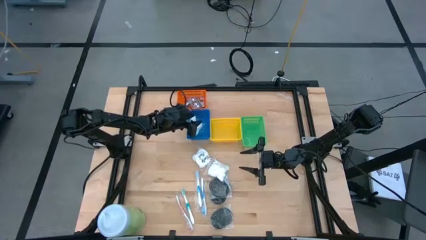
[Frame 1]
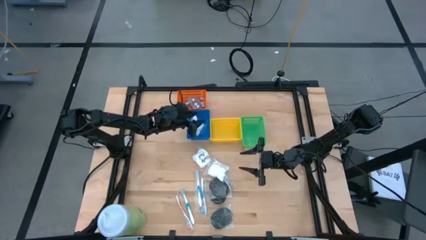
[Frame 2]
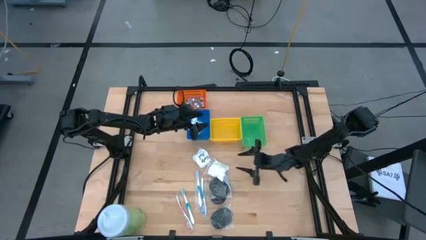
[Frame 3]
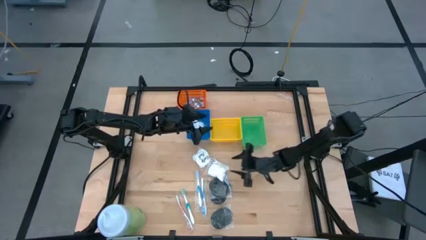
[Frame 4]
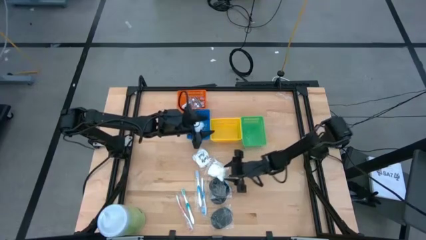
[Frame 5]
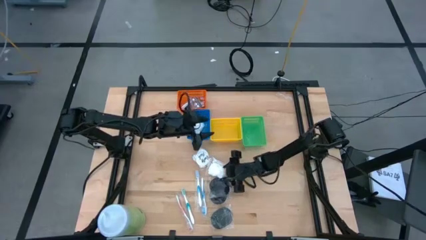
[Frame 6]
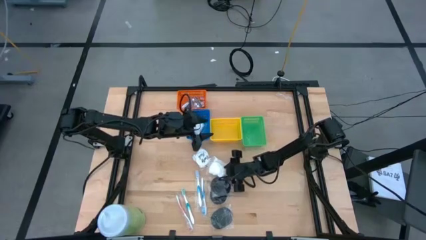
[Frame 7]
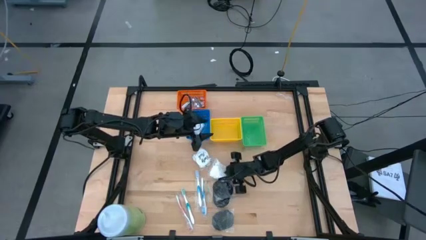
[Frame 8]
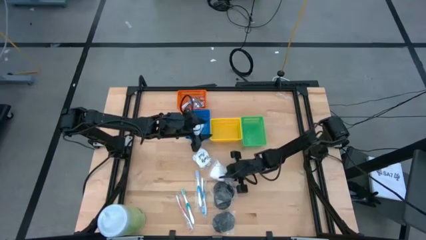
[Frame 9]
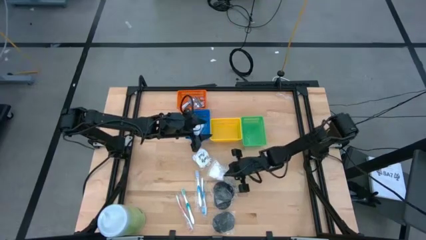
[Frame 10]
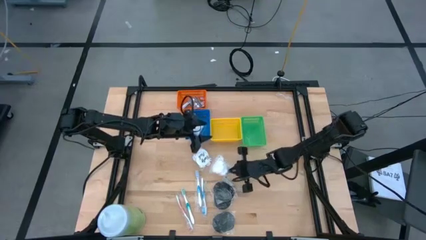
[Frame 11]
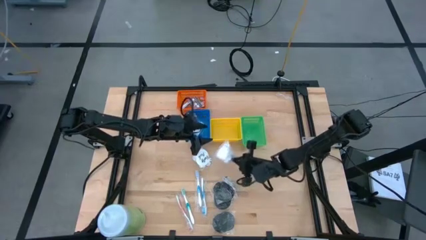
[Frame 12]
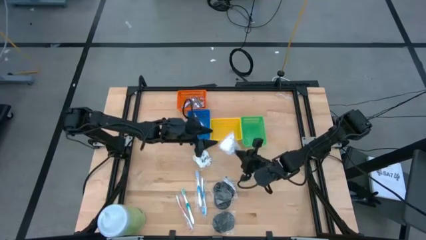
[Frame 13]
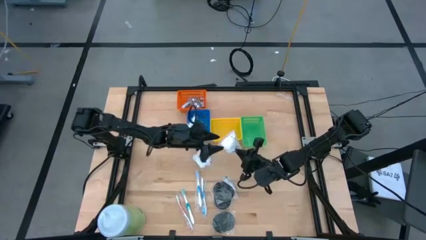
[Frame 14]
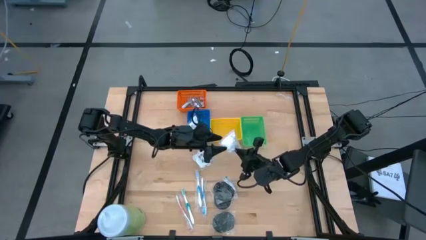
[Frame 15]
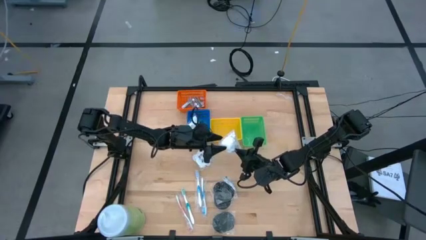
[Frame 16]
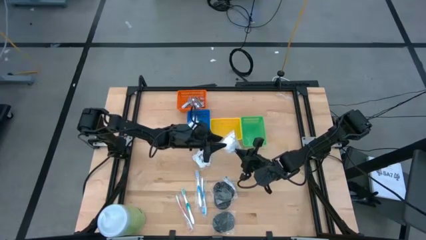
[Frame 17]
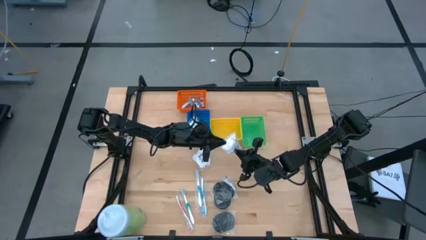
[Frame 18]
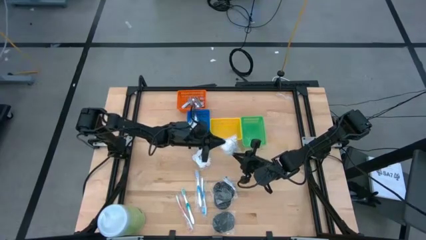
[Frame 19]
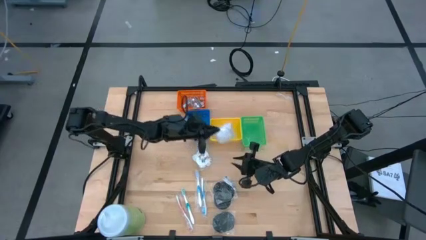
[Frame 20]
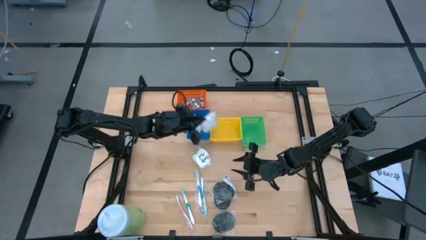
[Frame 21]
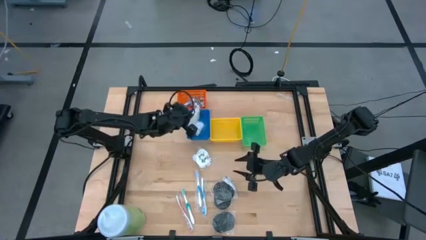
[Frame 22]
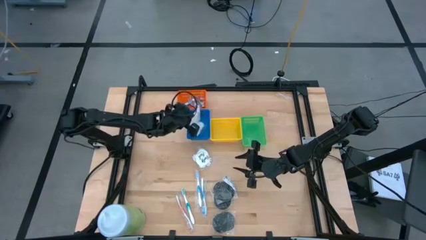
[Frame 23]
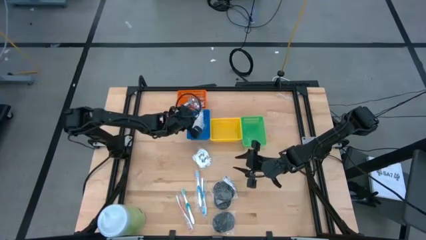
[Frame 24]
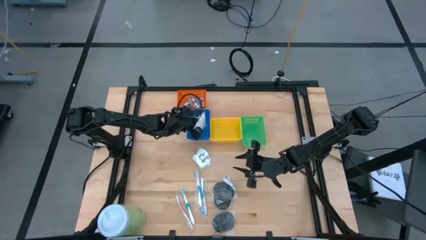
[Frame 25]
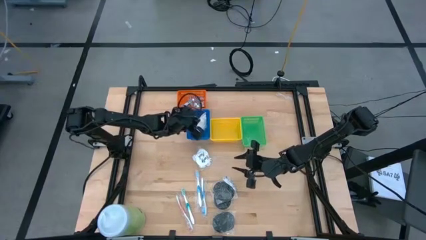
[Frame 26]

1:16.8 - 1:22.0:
Task: Pick & Place Travel size toiletries
Put the right vanity pack into the blue basket

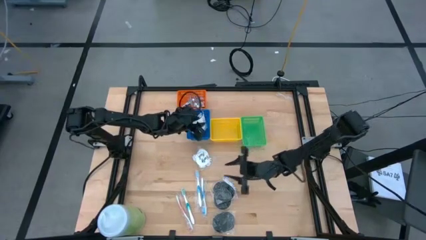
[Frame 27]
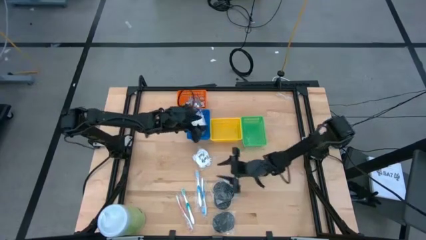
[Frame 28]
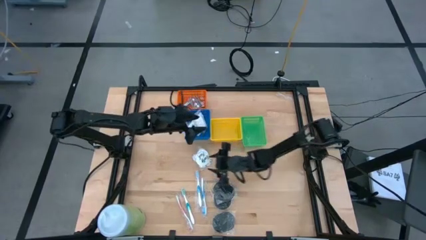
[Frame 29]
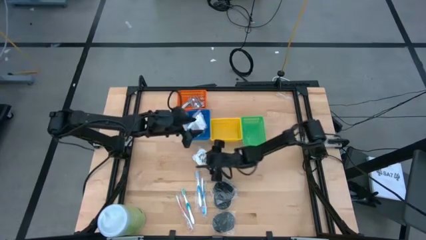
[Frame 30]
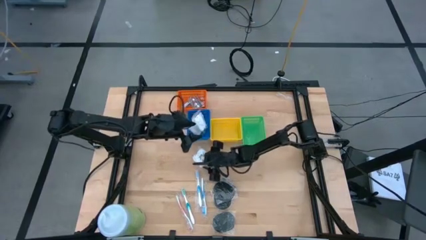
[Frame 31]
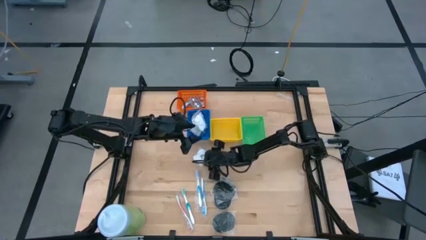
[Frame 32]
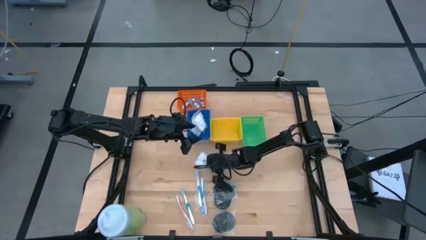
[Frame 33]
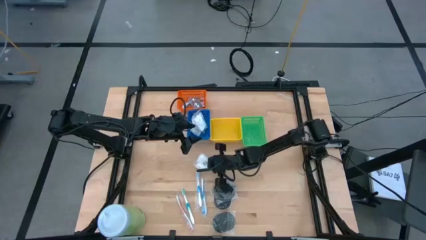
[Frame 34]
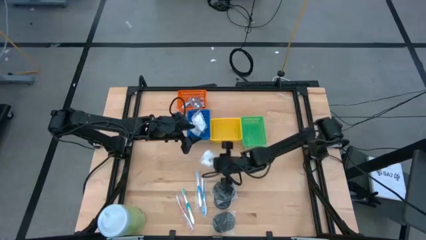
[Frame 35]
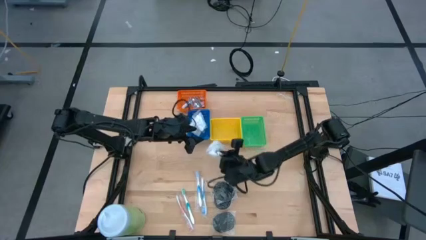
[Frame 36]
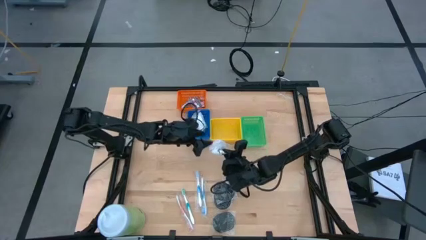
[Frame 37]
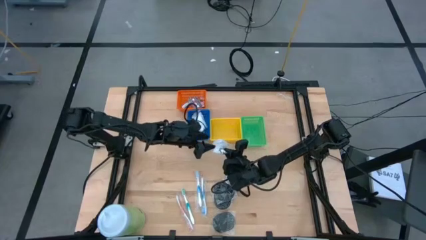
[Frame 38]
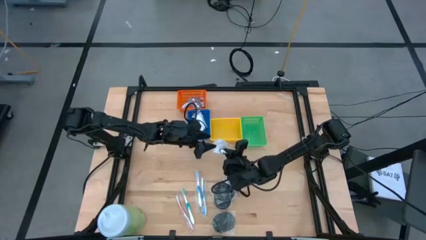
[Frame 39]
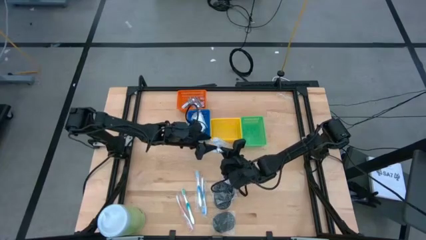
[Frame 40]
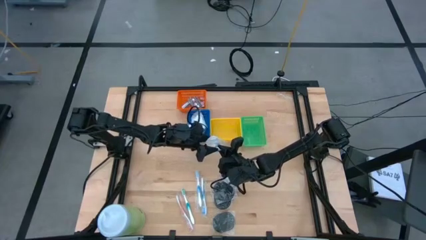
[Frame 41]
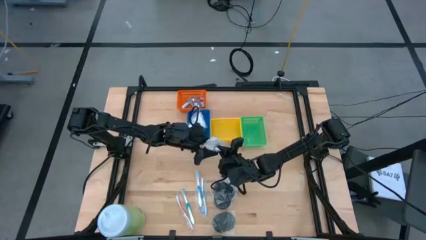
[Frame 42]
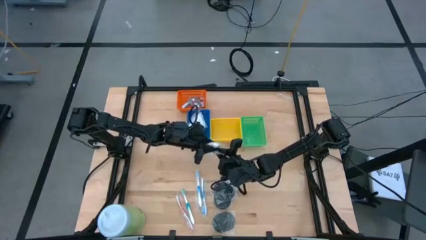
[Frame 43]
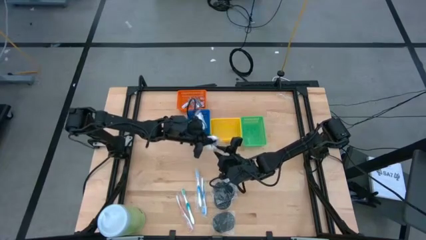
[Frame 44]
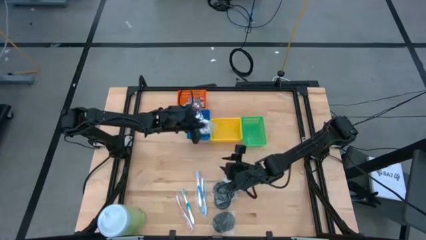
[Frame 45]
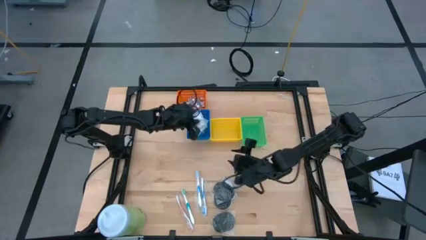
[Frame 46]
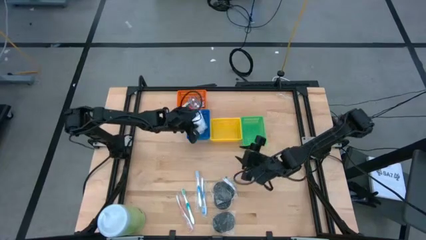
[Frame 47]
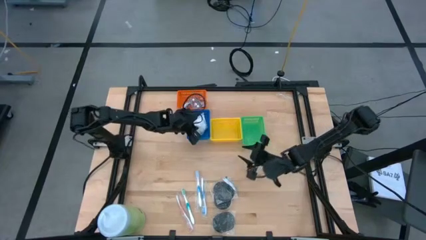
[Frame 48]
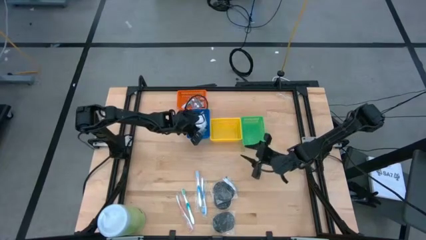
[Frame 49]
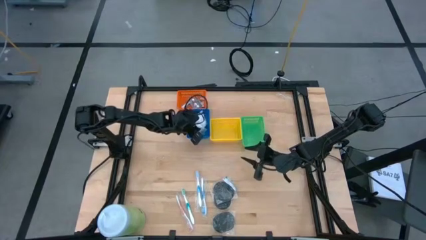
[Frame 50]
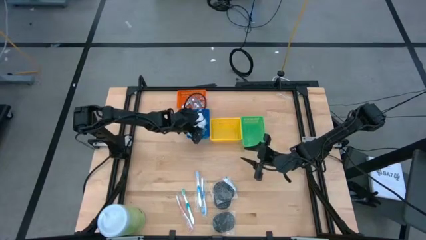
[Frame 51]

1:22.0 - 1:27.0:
Put the vanity pack into the blue basket

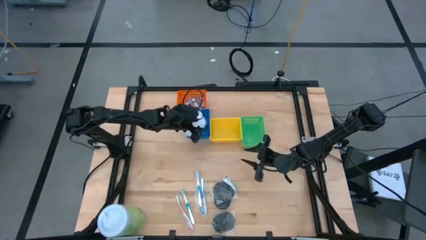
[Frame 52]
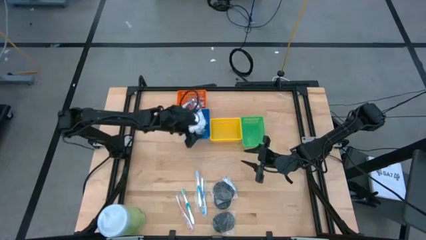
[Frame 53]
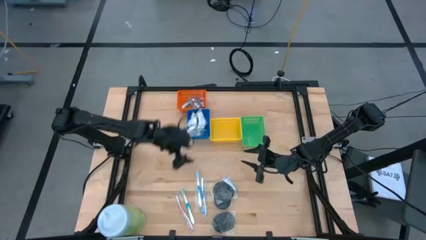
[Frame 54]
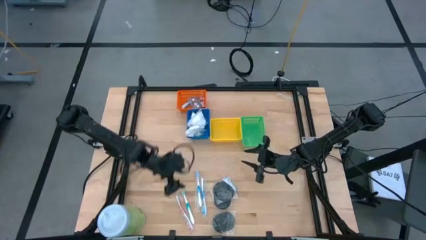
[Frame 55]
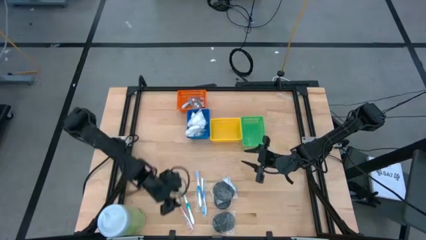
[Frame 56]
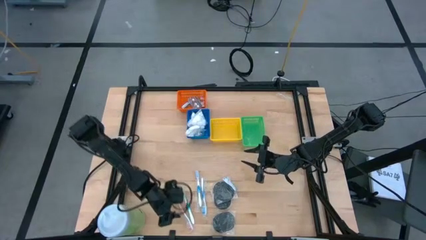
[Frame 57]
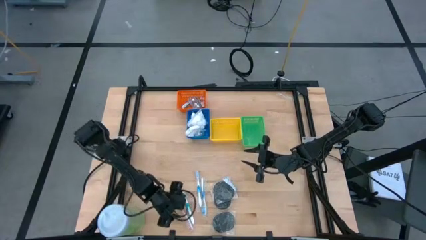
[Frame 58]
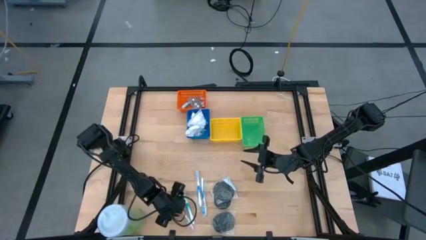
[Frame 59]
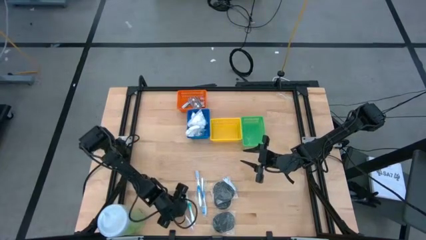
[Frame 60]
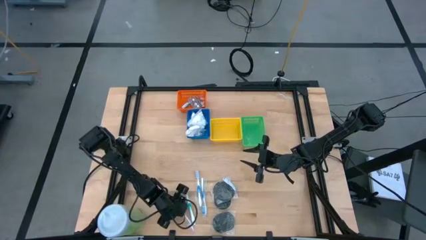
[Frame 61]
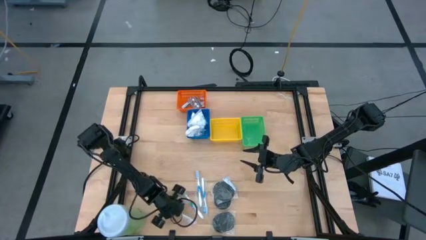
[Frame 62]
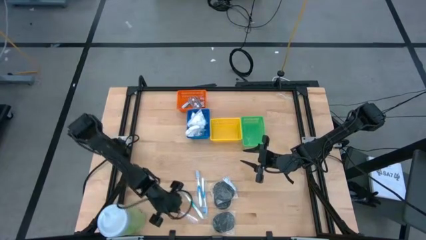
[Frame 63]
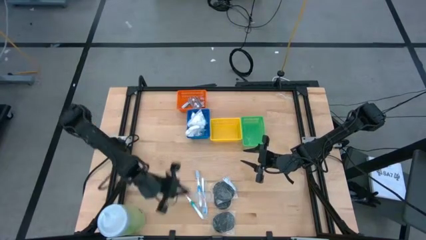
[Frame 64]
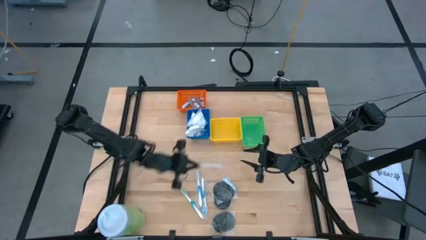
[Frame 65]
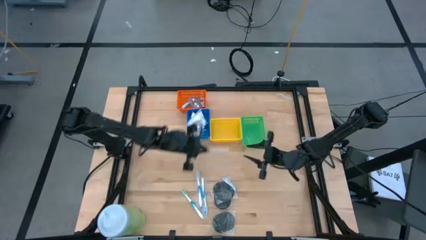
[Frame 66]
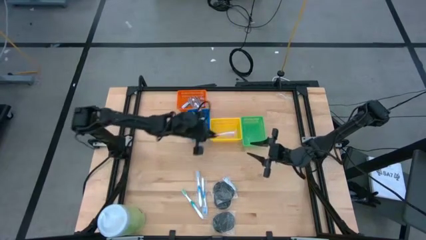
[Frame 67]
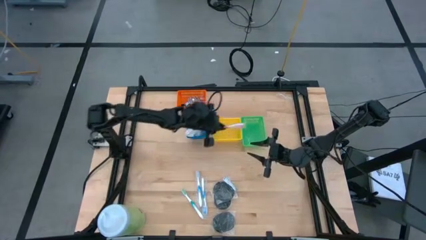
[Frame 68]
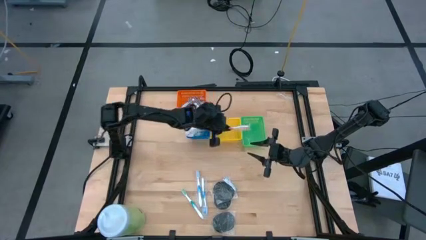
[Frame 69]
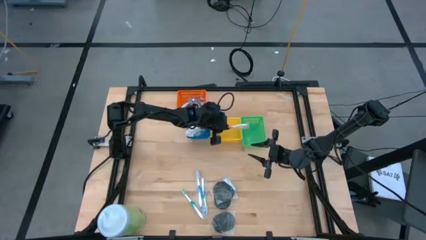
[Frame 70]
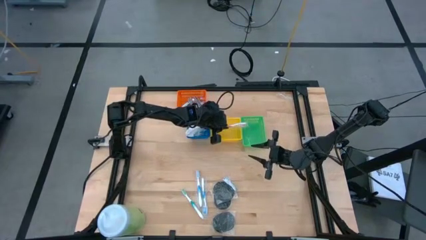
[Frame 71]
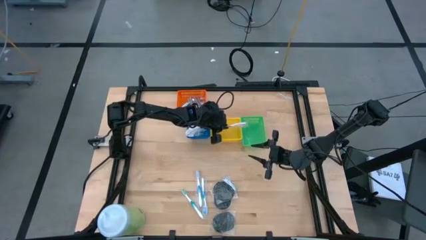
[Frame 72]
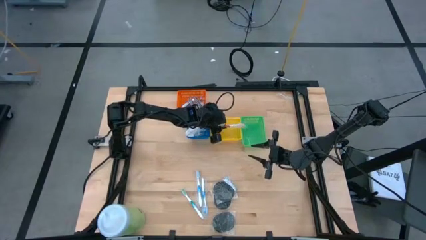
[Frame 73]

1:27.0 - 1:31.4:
Put the orange toothbrush into the yellow basket

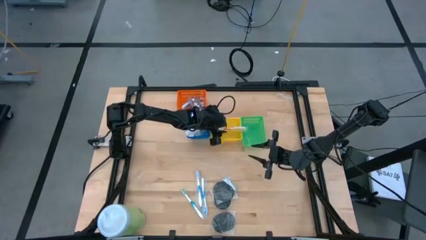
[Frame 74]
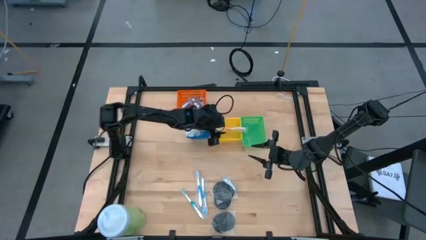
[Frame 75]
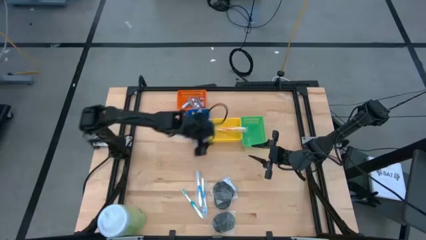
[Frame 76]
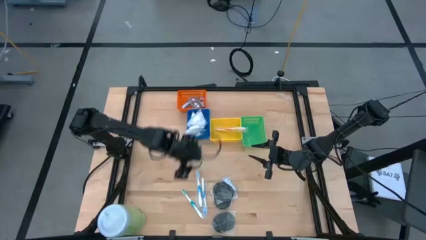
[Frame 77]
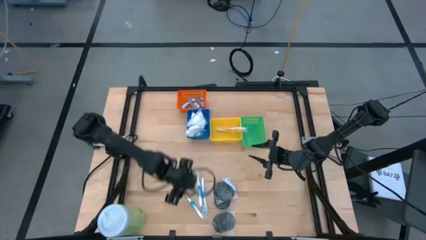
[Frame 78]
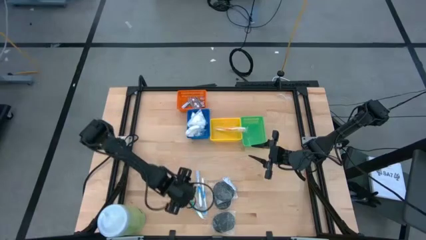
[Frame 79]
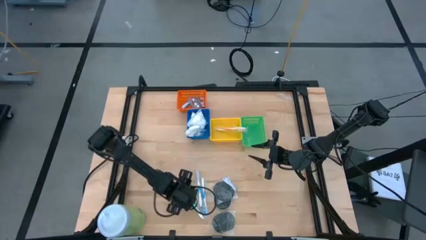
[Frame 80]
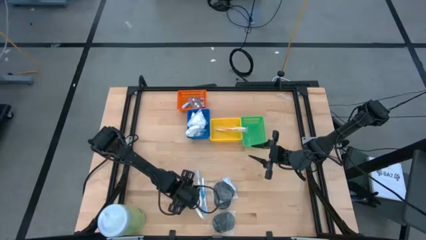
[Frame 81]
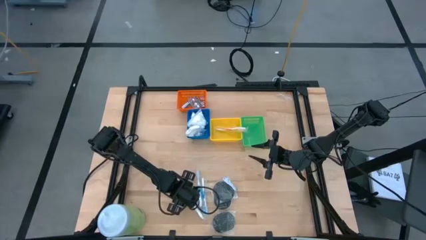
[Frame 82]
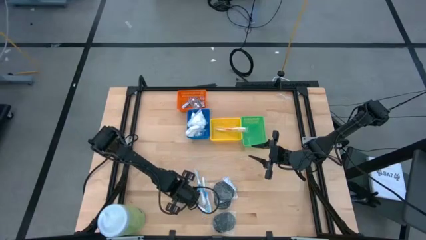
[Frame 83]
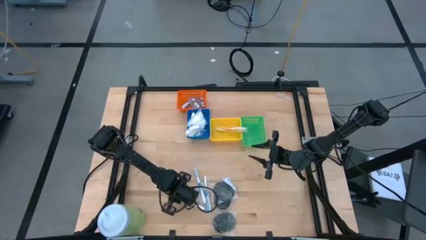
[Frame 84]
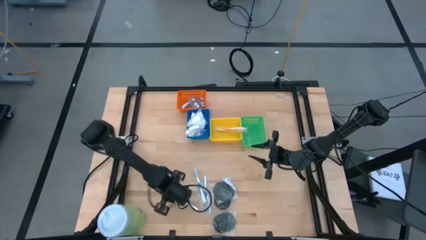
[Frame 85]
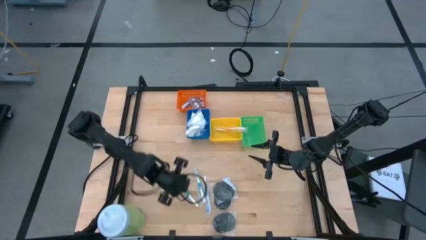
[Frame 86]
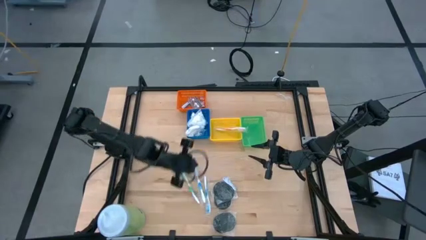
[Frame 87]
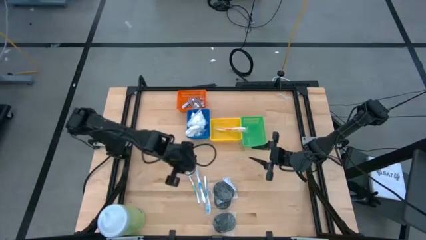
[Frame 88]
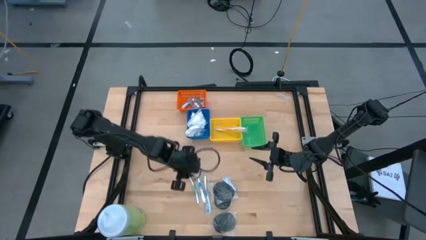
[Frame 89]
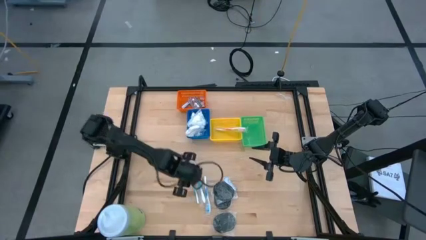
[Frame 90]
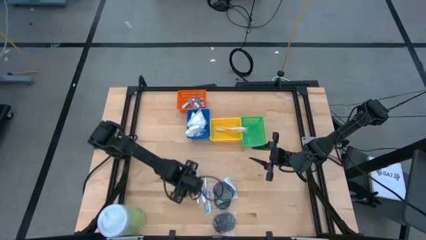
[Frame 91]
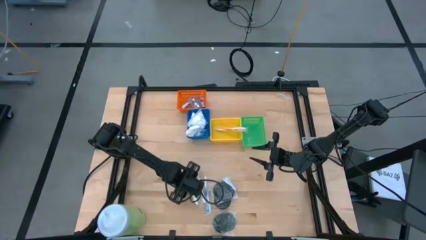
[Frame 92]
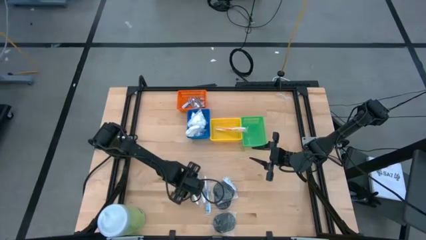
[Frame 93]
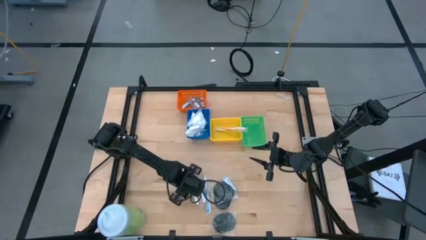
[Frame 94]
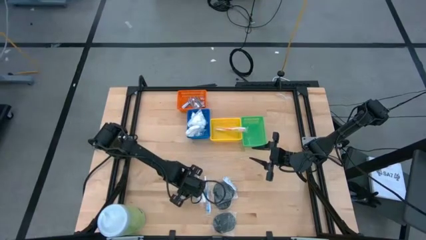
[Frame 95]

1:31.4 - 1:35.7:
Put the green toothbrush into the yellow basket
